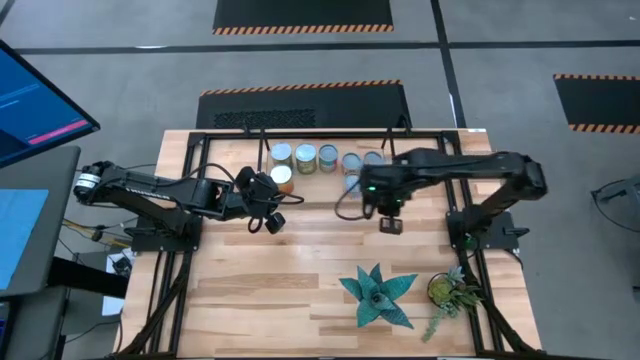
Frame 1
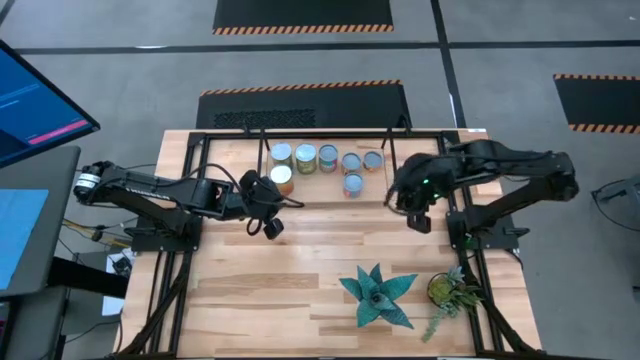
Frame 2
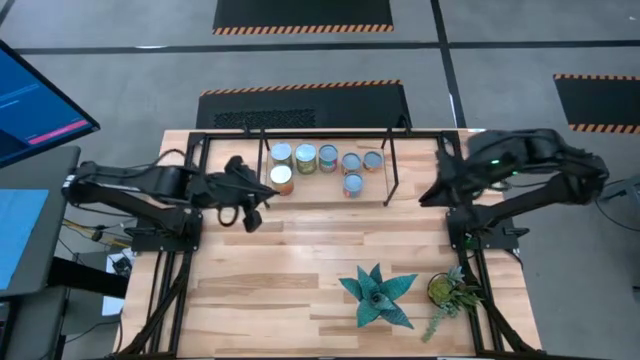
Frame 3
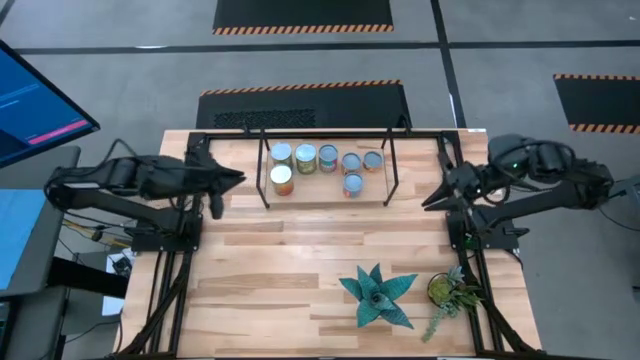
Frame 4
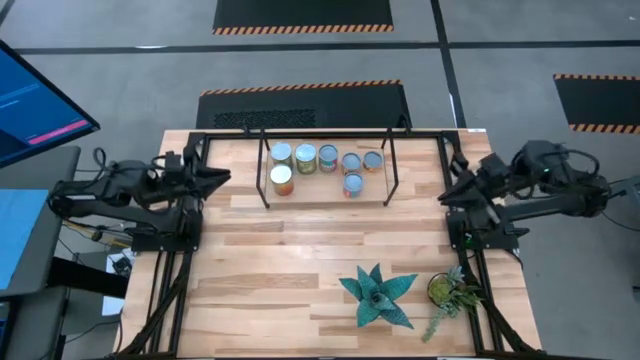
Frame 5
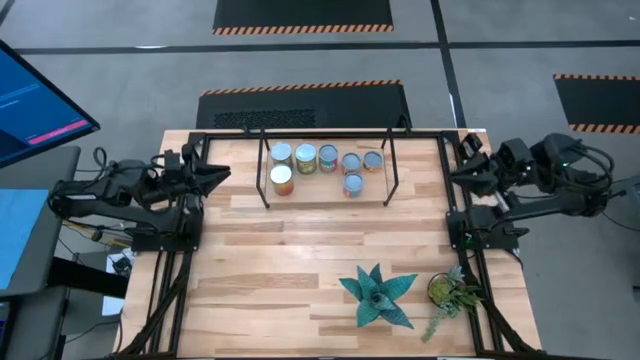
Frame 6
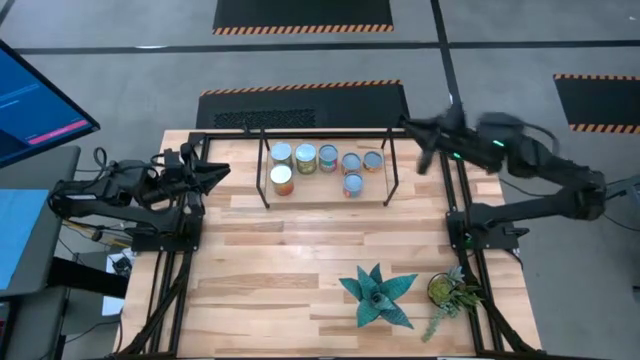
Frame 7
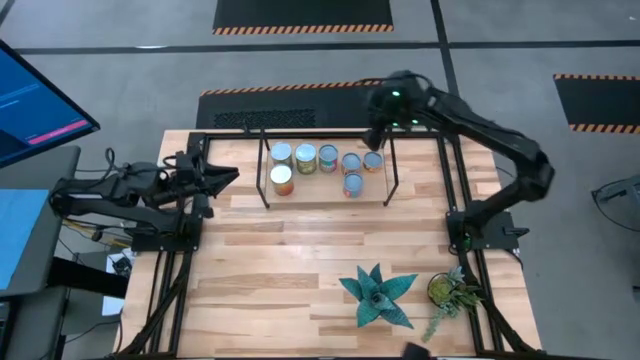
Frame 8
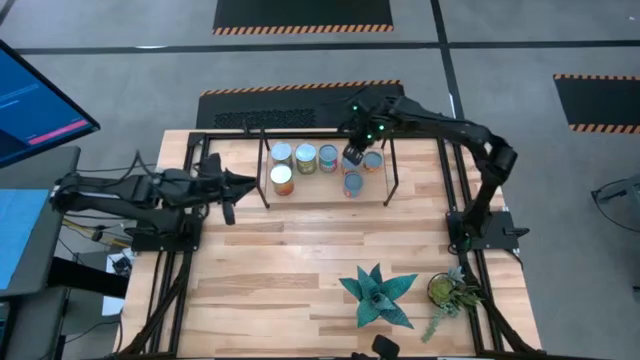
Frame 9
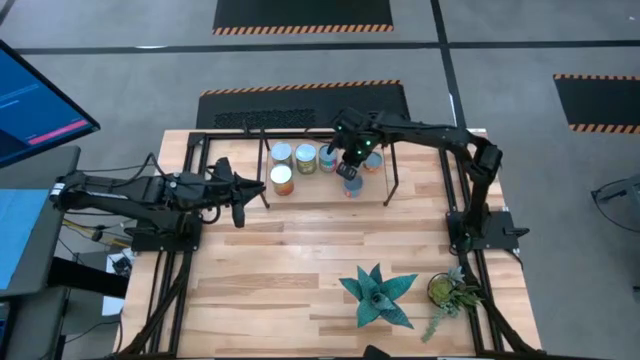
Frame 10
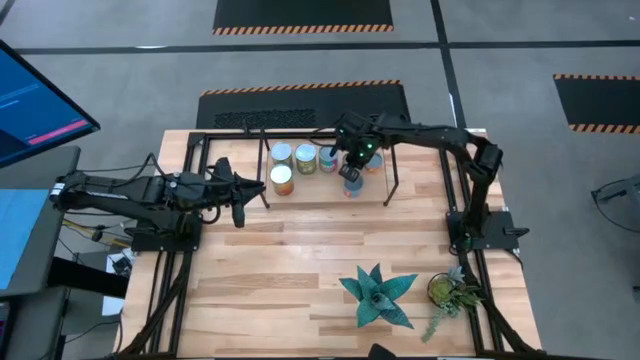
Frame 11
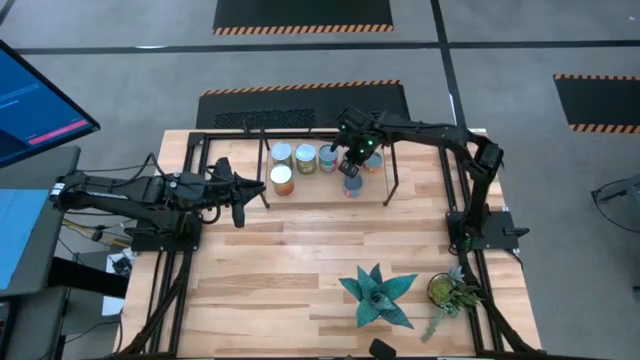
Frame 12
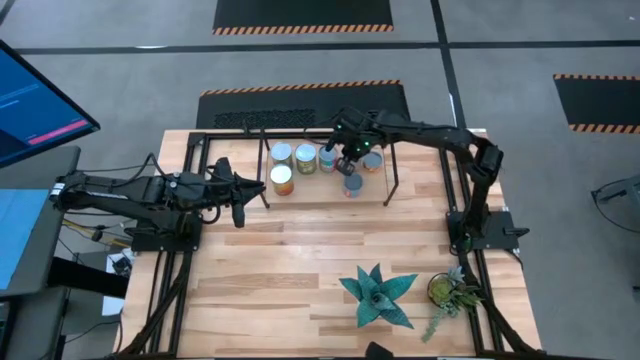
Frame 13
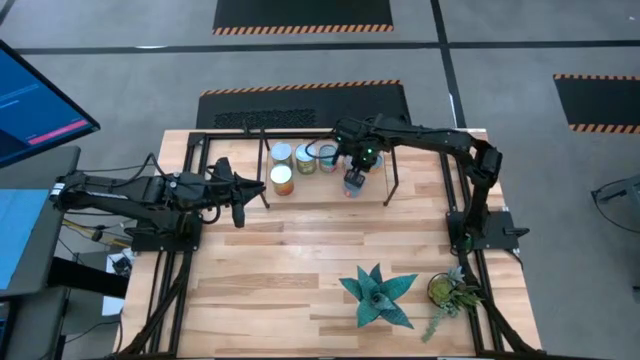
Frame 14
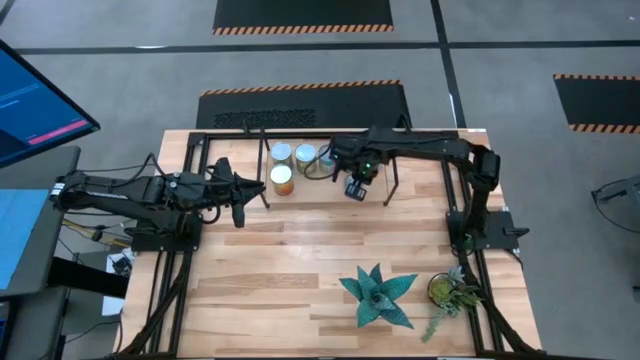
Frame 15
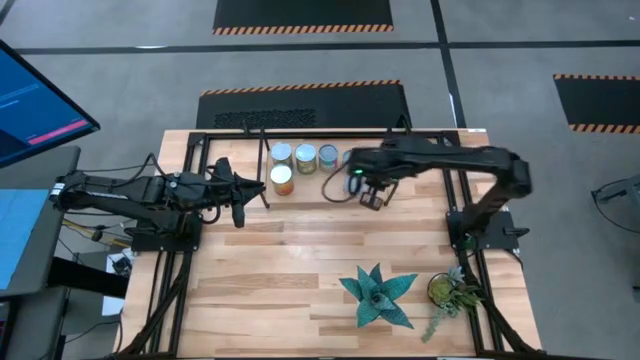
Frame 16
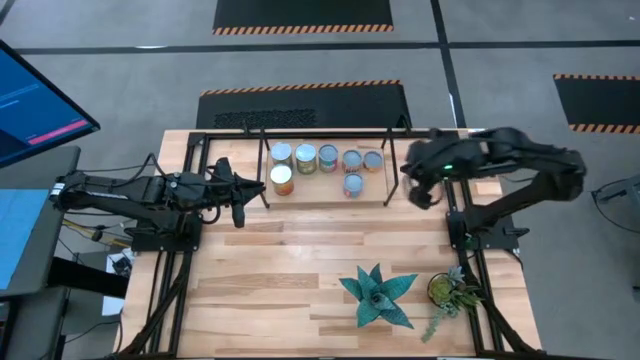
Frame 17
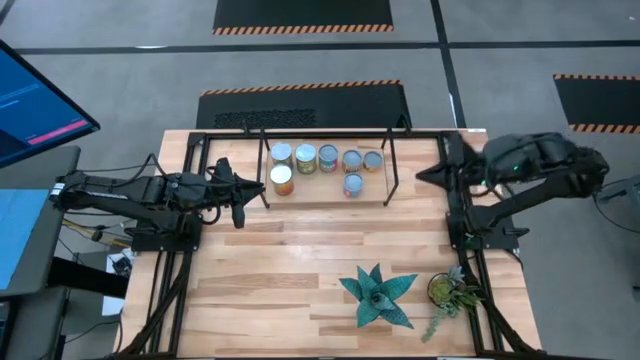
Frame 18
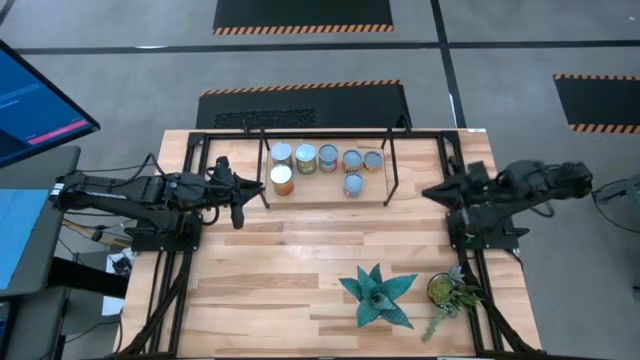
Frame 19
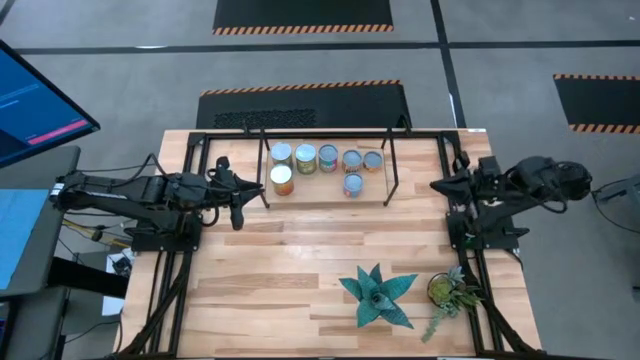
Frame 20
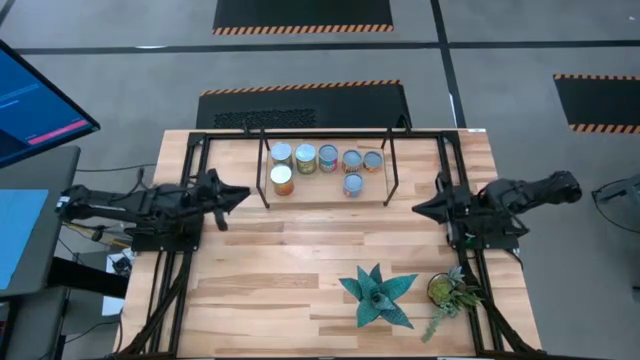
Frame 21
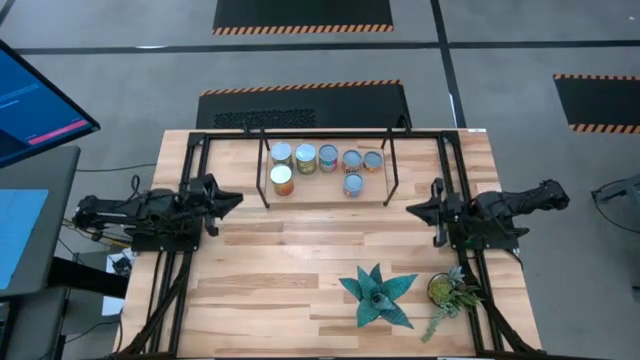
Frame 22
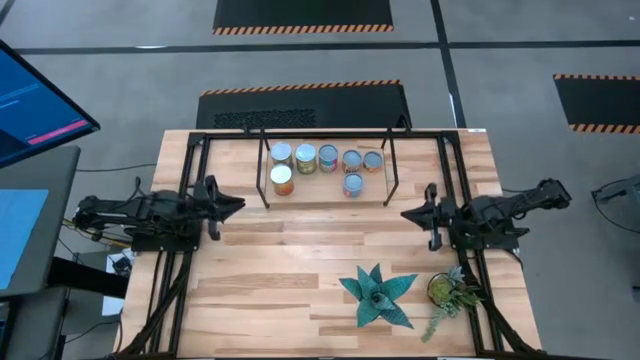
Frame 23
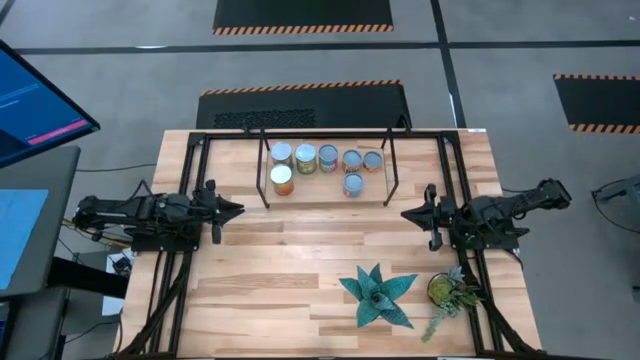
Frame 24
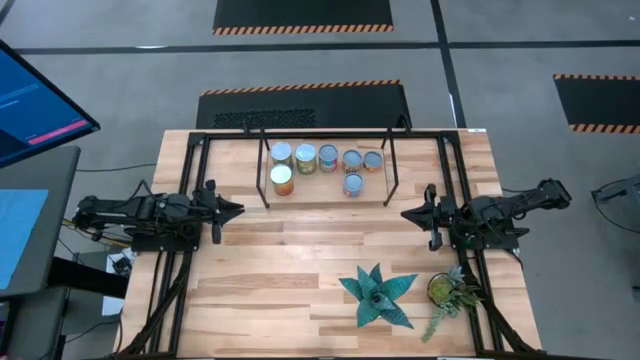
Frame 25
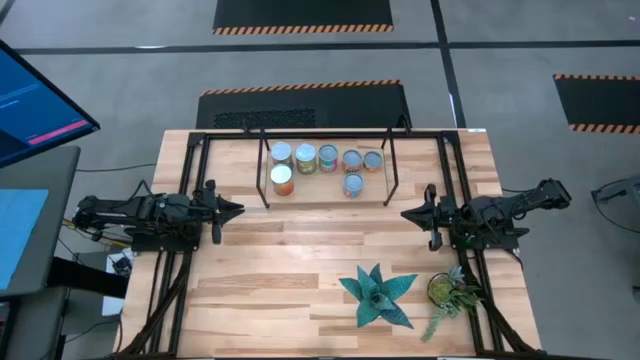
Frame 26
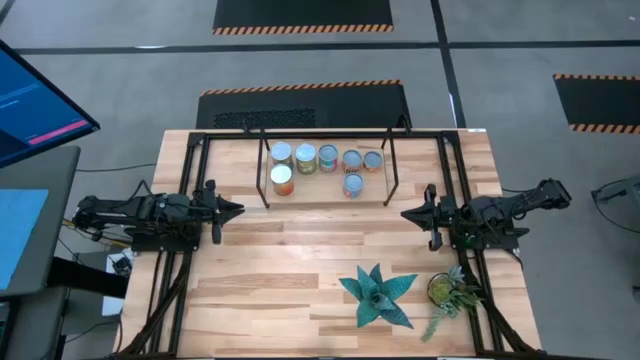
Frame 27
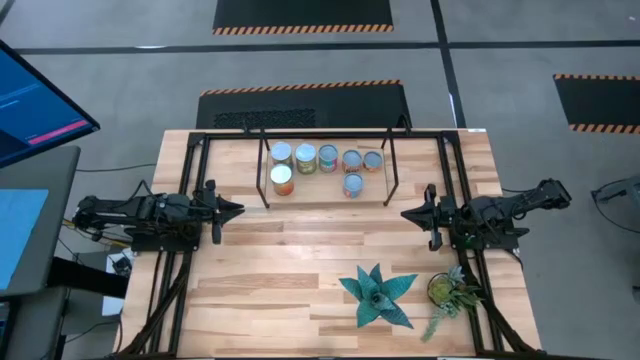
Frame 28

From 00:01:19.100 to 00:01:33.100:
Task: Pick and place cans onto a shelf
Return to Home Position

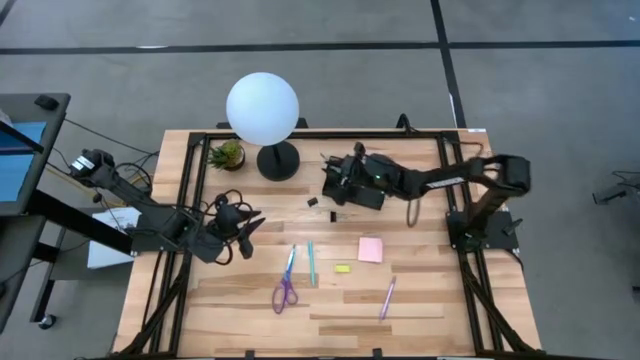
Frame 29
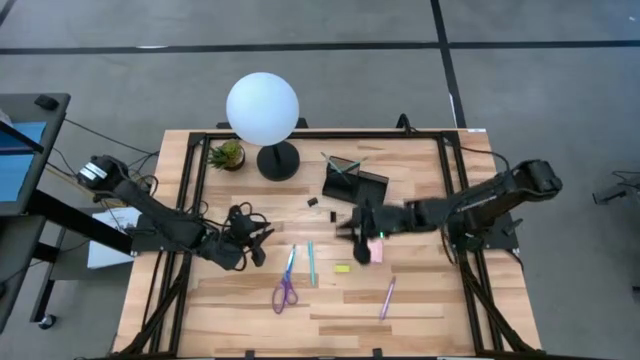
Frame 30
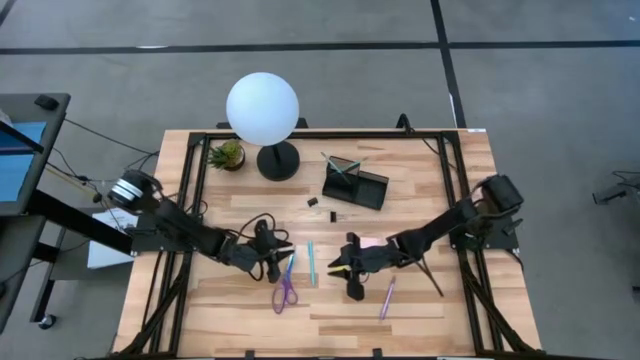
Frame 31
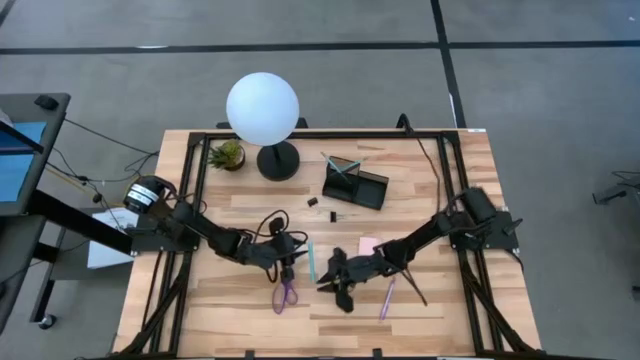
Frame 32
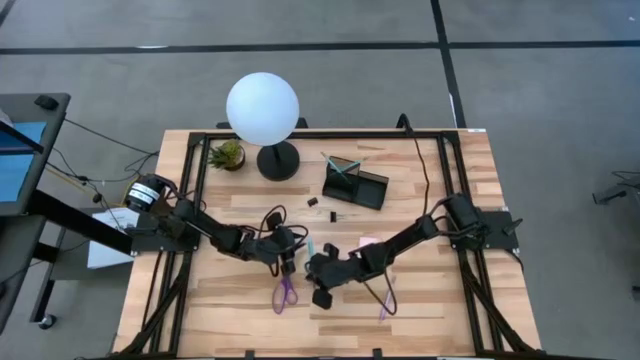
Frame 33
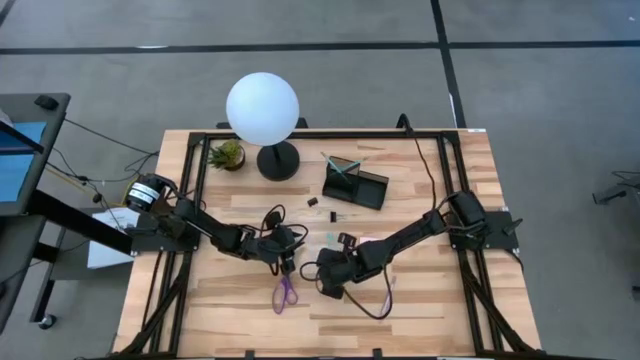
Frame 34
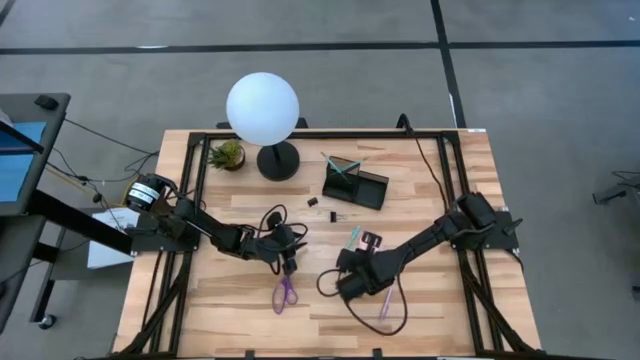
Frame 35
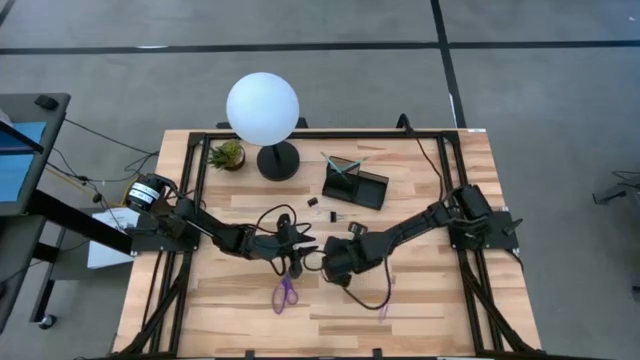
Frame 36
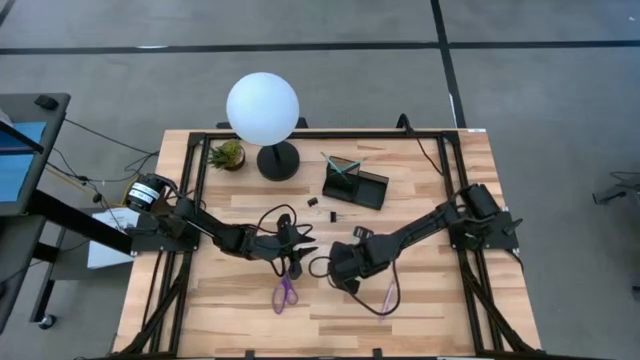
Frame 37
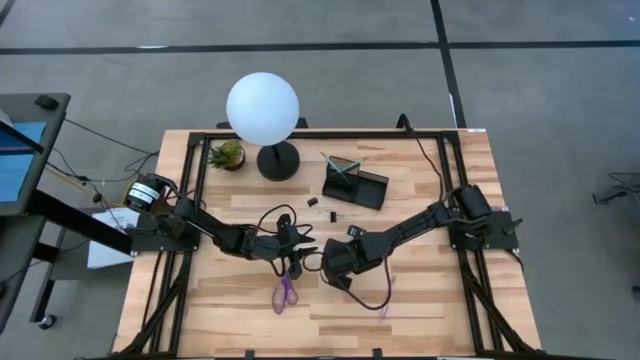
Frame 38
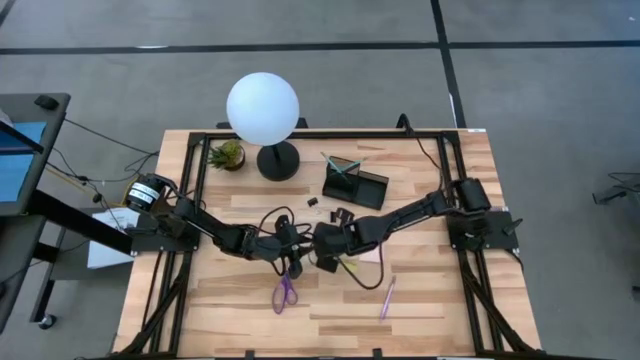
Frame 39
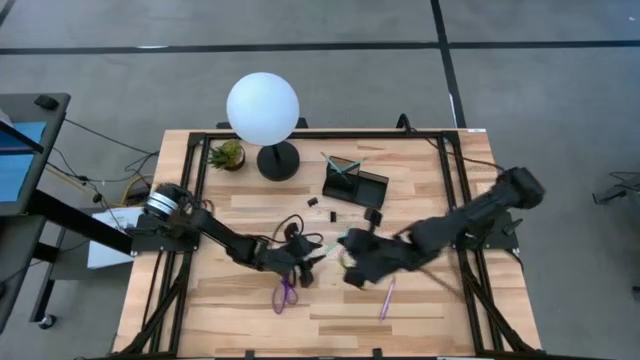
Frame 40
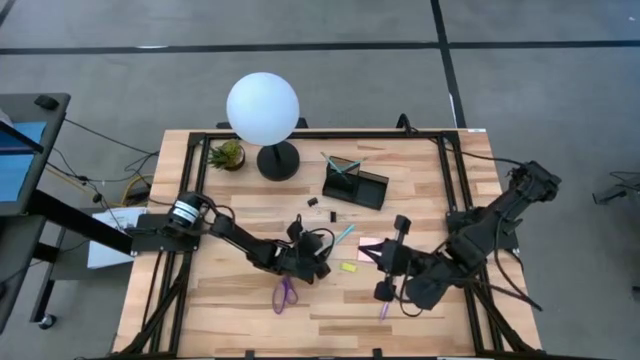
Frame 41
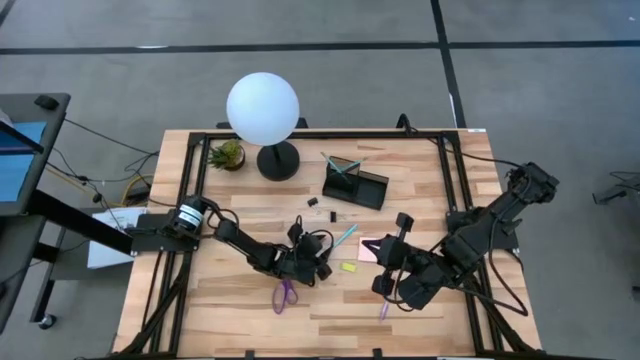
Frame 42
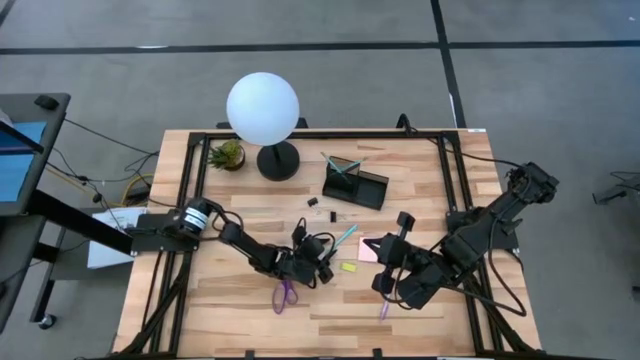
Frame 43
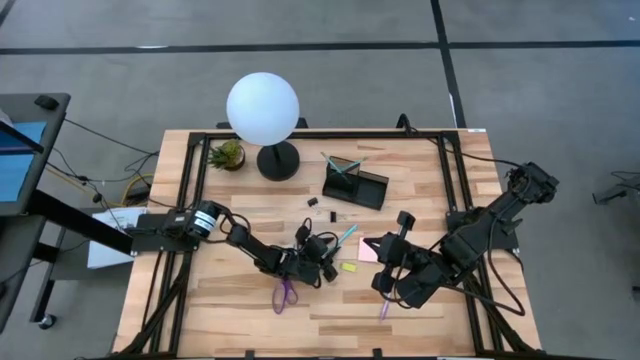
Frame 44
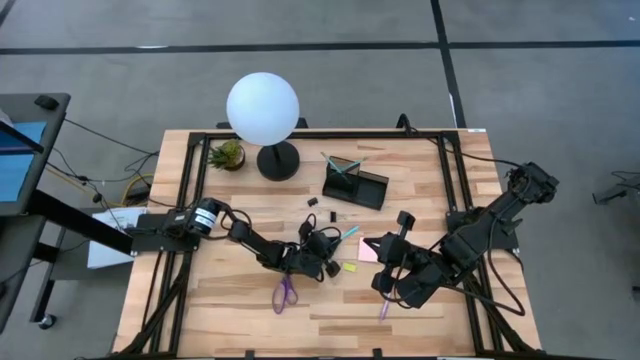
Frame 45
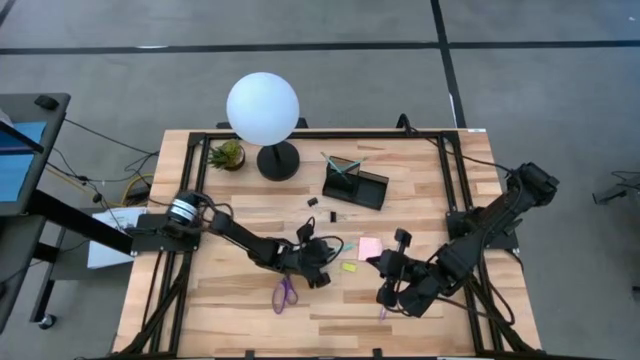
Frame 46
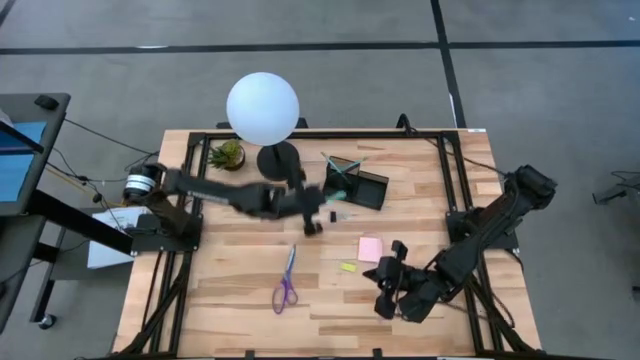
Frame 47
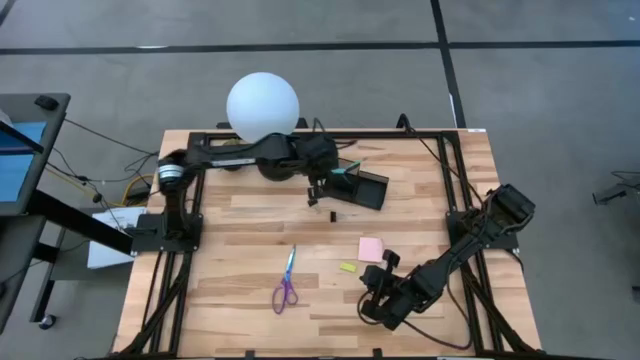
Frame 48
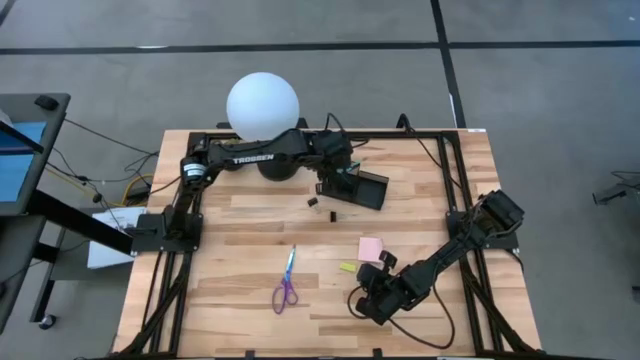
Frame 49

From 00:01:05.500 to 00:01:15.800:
Task: Pick and place office supplies into organizer
Put the blue pen into the black desk organizer
